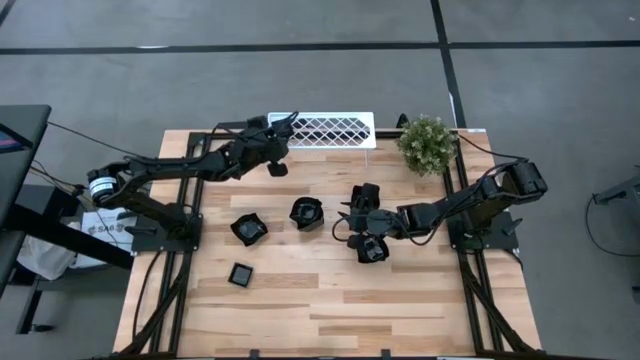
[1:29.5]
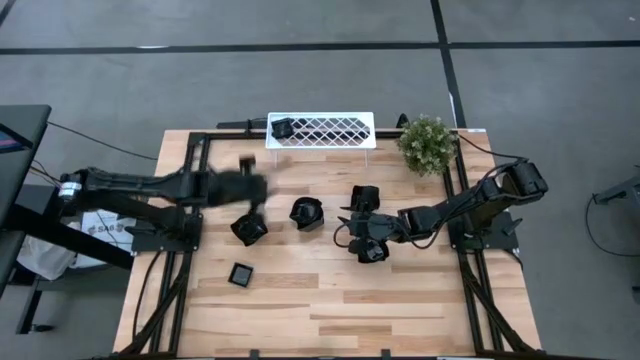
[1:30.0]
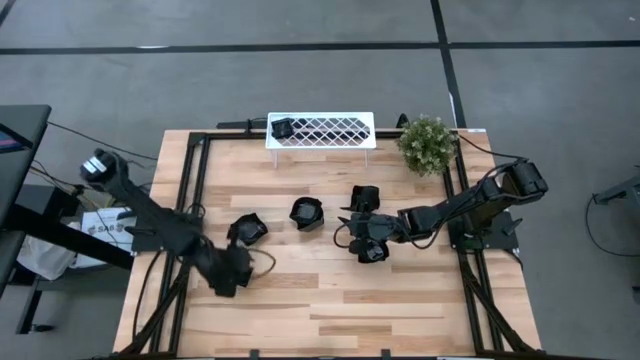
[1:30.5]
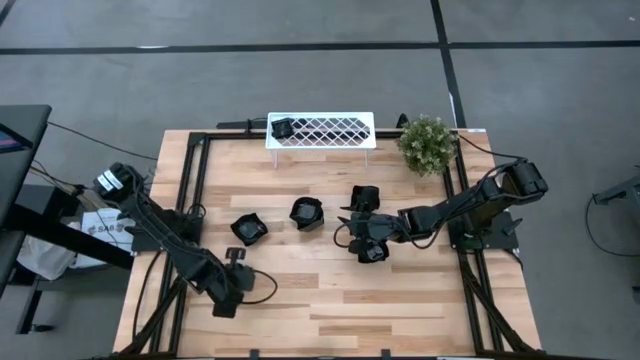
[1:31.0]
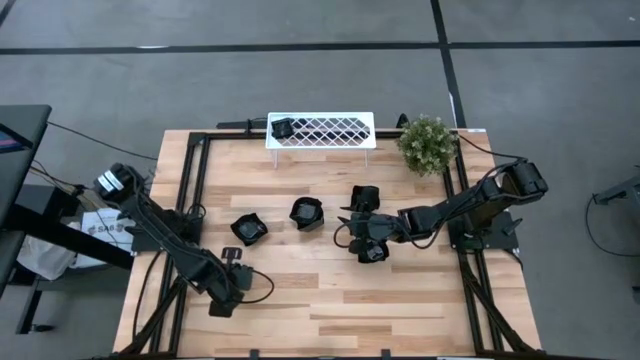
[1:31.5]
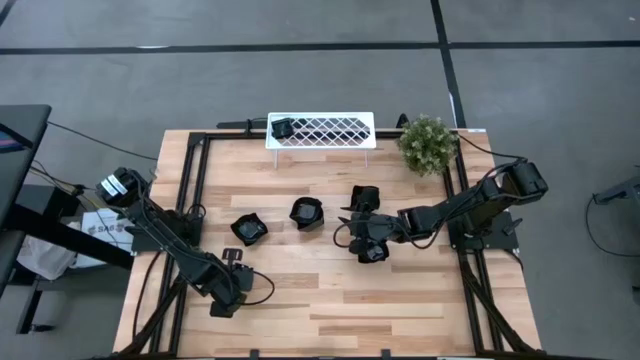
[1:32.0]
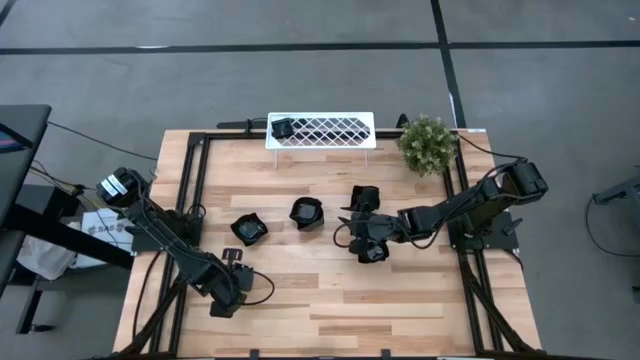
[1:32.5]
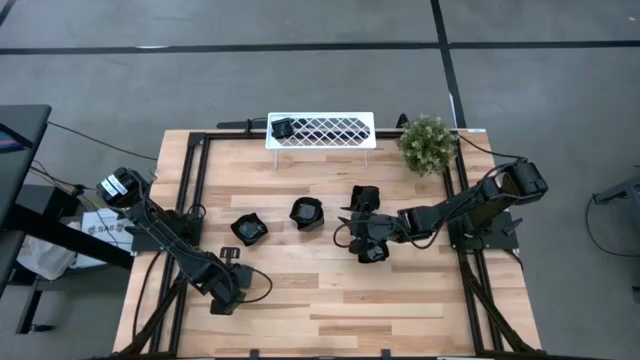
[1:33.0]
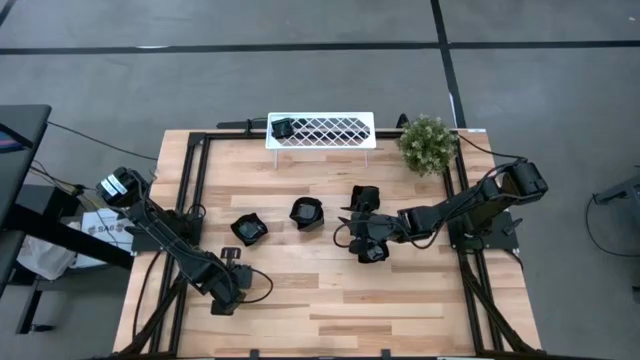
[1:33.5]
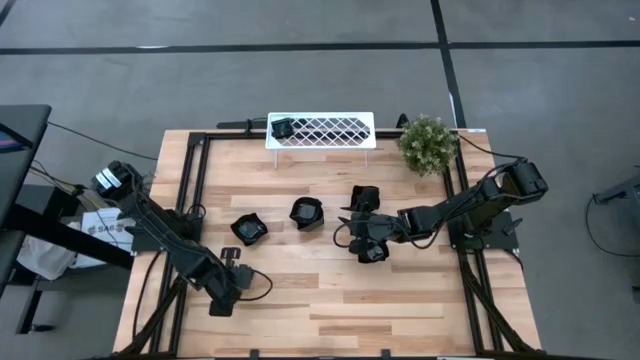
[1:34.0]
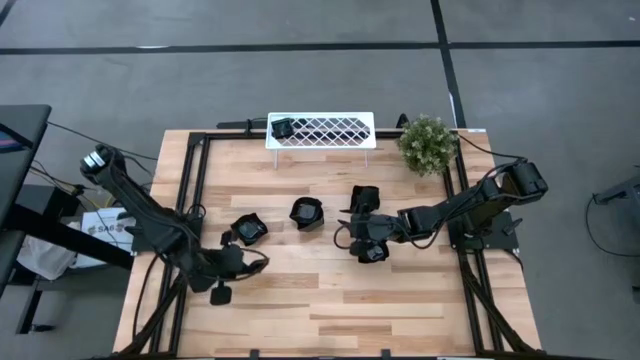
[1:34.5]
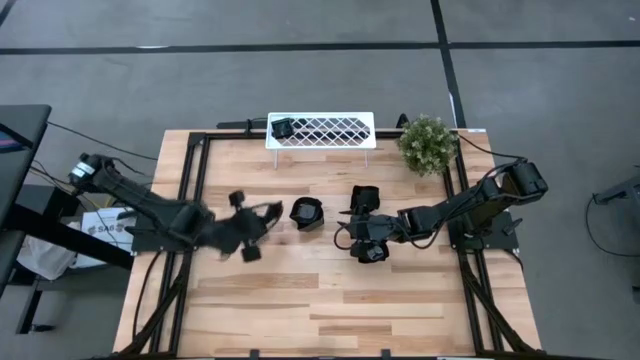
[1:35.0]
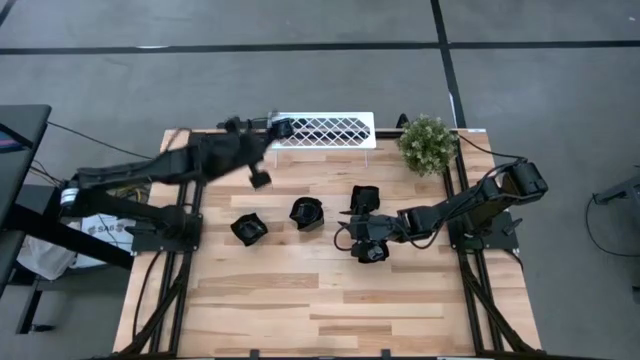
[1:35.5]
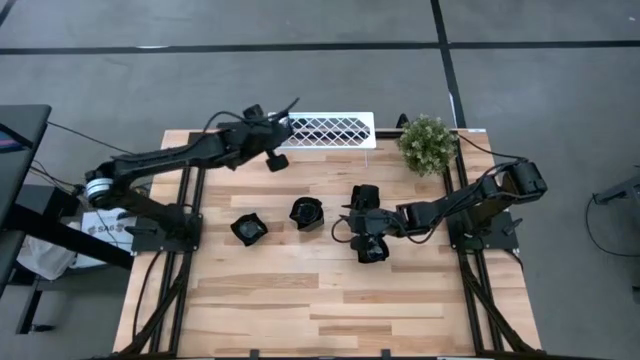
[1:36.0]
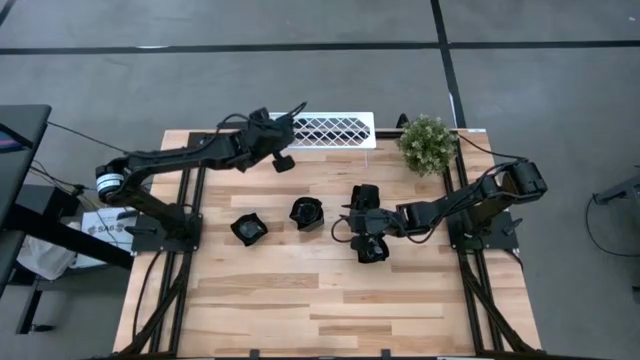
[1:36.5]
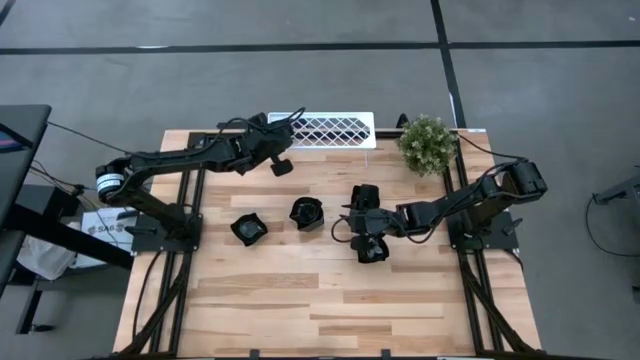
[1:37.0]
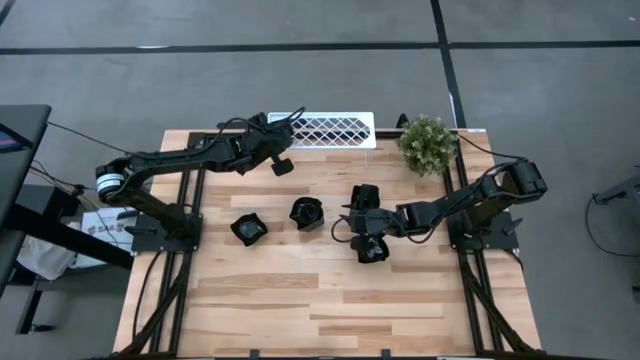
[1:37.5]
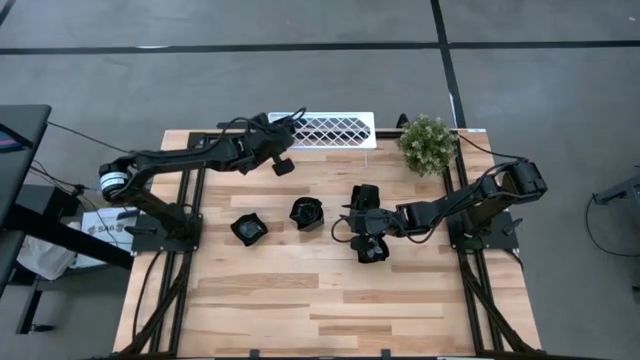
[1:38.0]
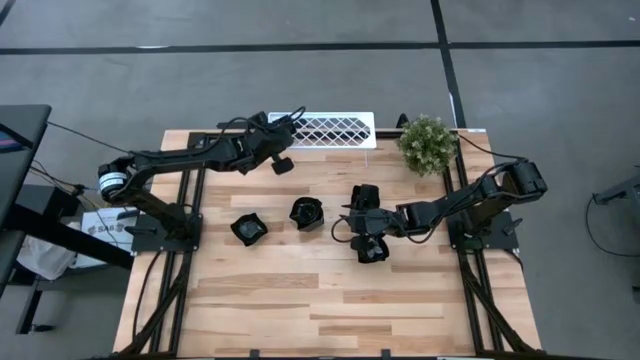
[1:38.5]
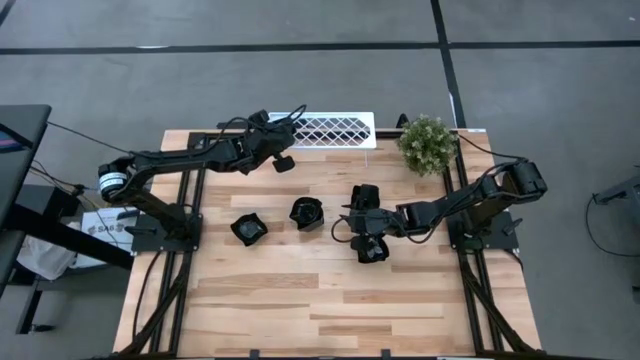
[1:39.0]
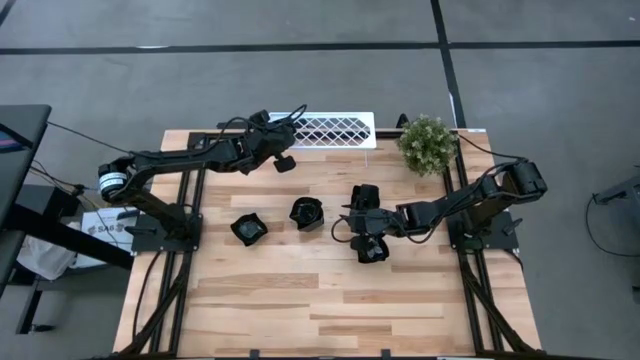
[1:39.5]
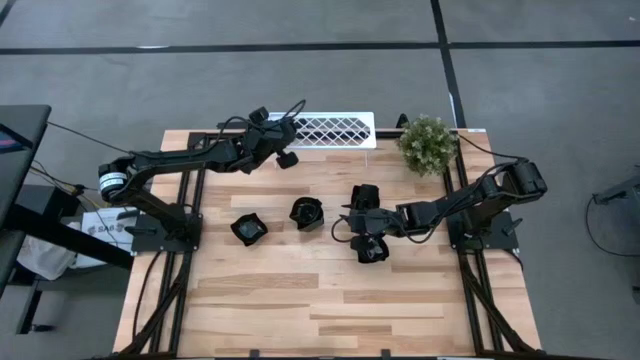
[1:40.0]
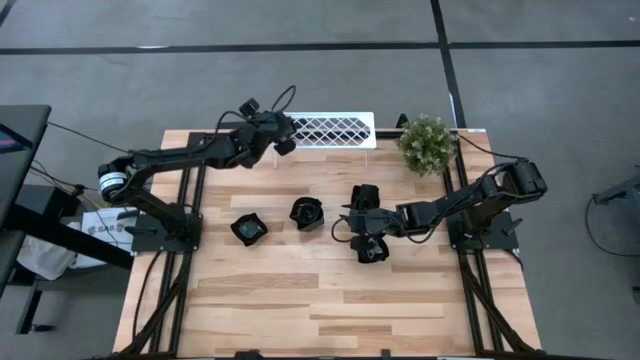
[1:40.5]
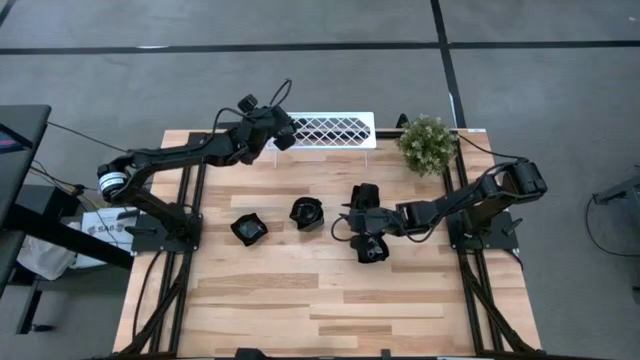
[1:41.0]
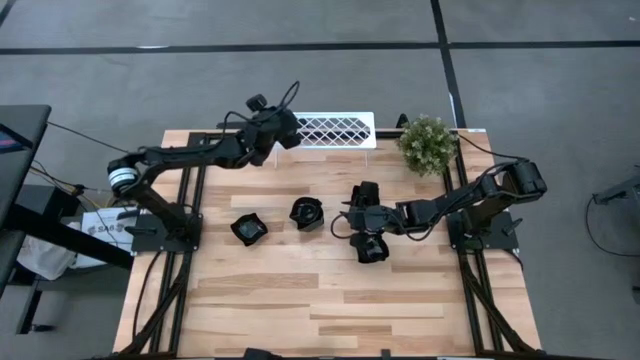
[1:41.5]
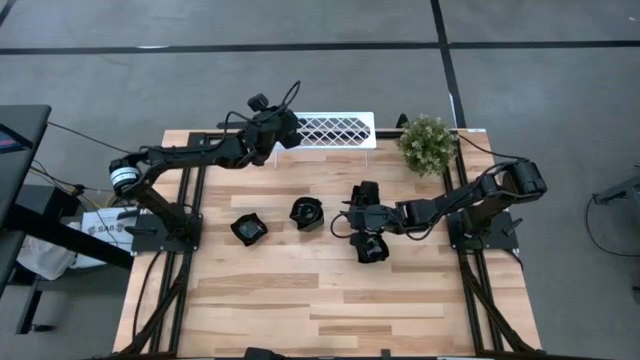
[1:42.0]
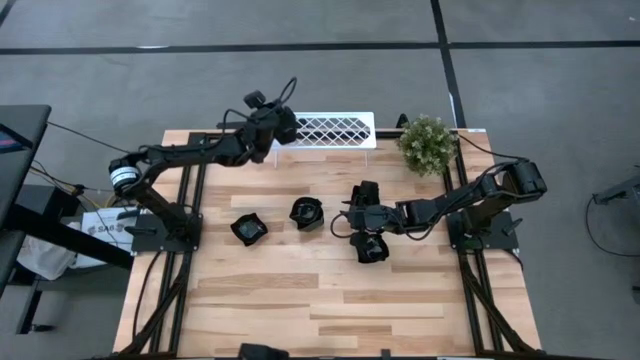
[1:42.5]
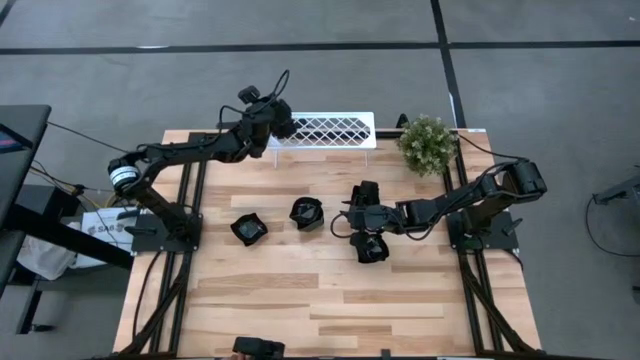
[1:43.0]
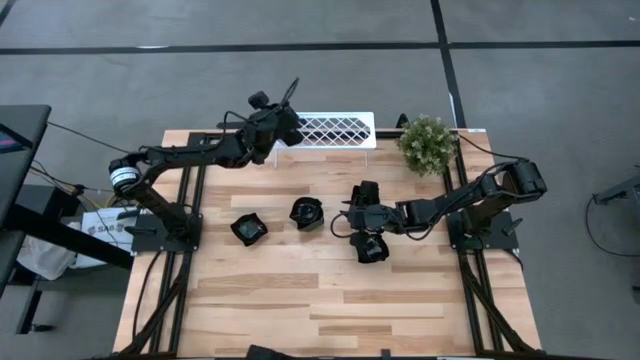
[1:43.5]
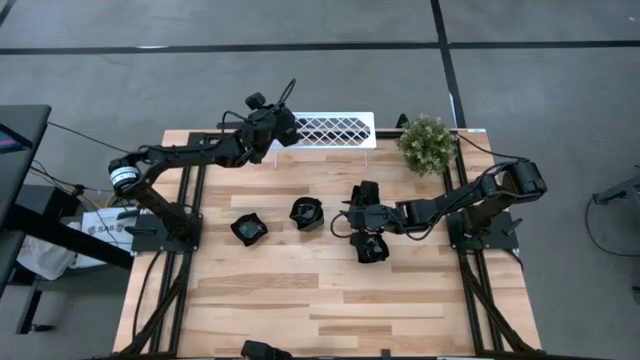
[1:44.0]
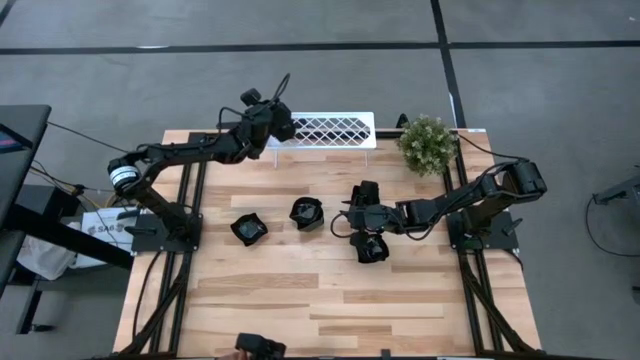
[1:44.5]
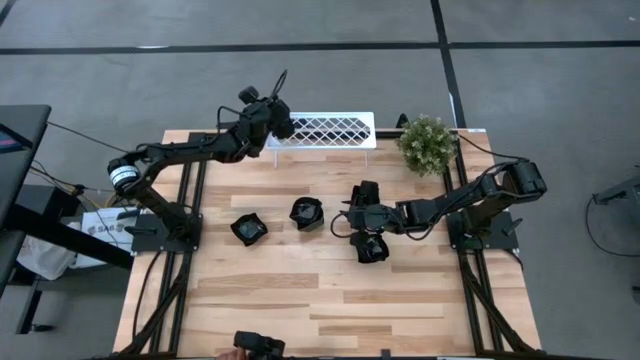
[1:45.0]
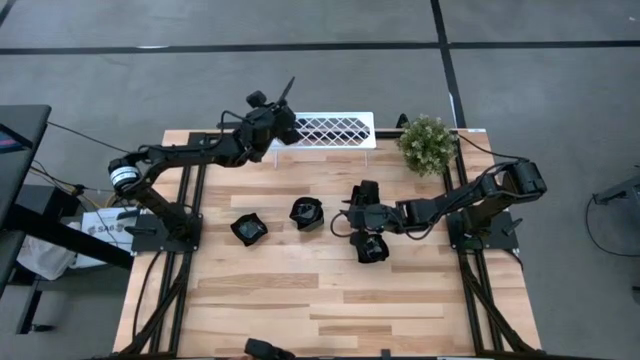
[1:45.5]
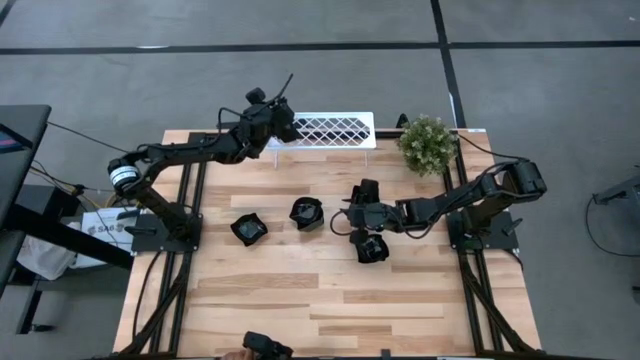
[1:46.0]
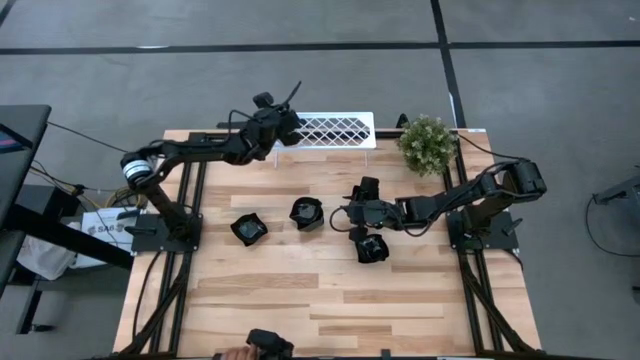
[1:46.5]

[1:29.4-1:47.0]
Task: Pick & Place Mini shaped plates
Stack the black square plate on top of the black square plate on the shelf

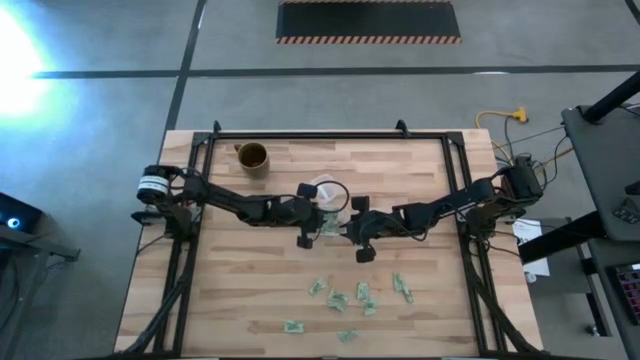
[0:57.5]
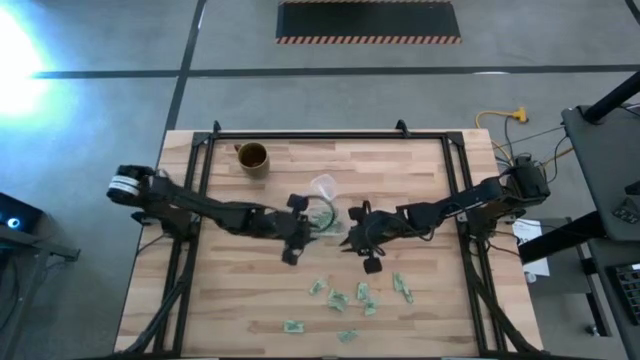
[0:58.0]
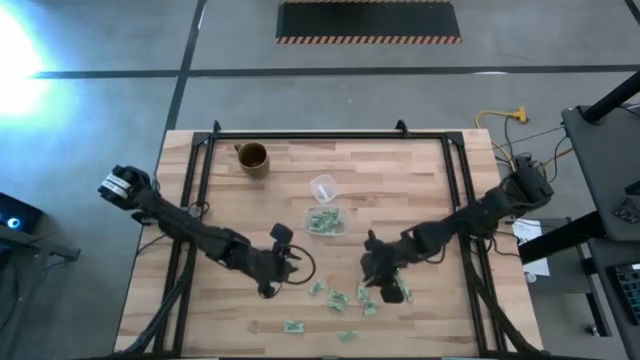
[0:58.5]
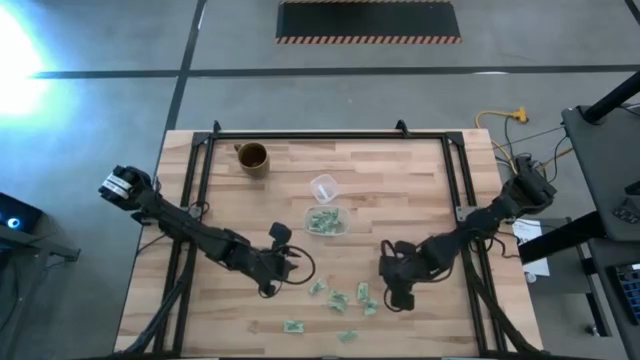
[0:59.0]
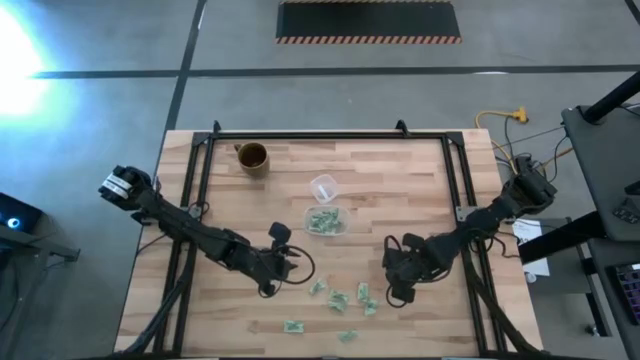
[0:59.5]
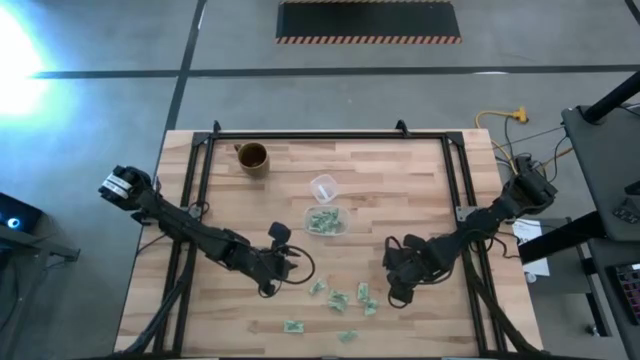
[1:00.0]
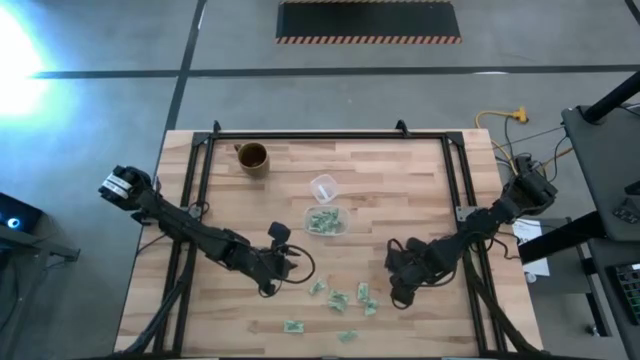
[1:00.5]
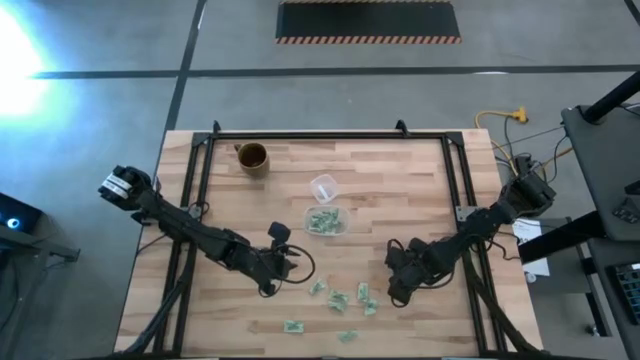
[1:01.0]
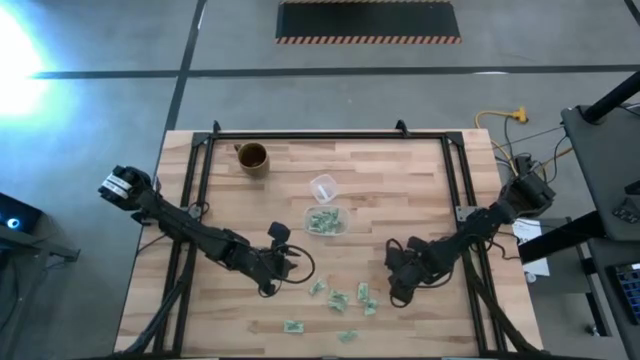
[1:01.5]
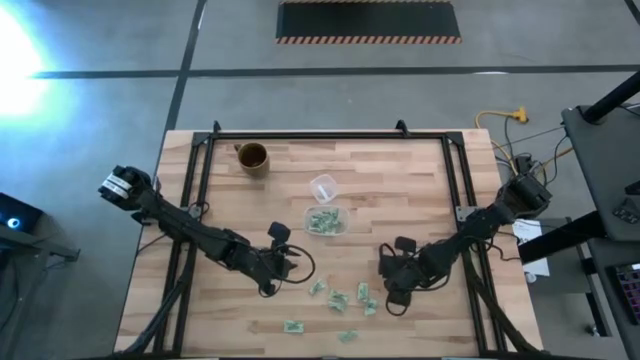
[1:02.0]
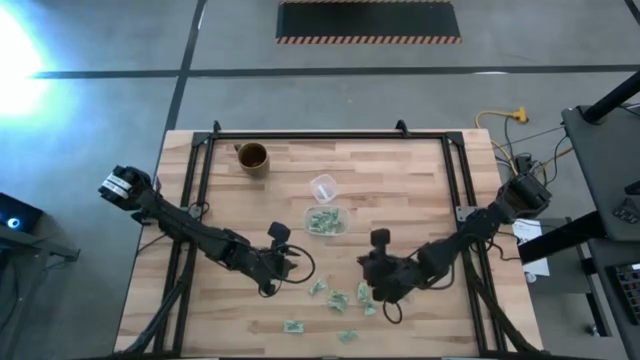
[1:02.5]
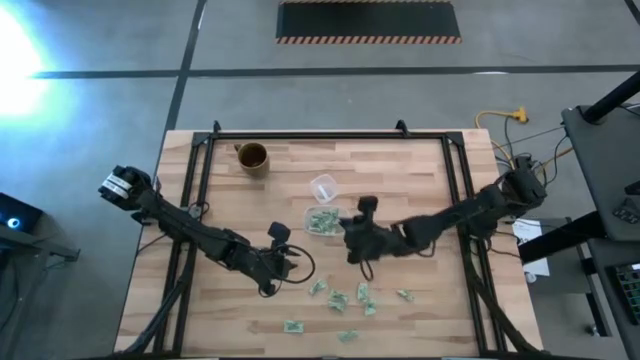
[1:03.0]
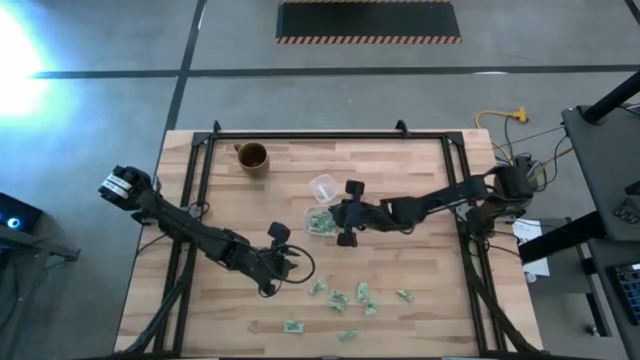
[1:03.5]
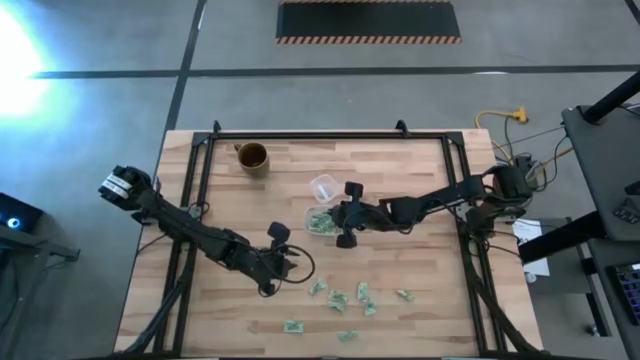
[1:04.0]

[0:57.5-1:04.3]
Task: Pick and place Stevia / Truvia into bins
Put the stevia packet into the bottom transparent container
